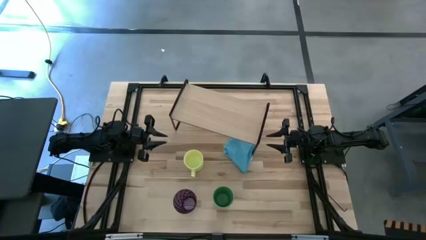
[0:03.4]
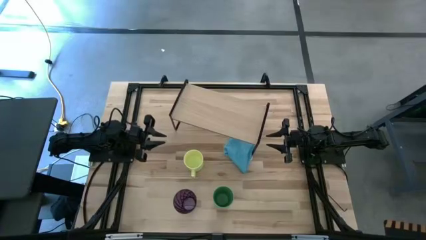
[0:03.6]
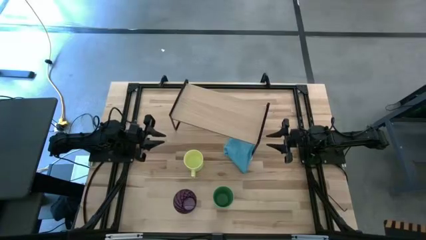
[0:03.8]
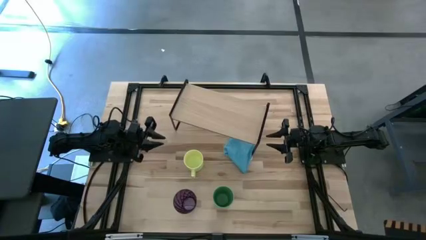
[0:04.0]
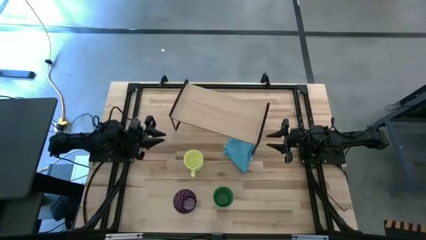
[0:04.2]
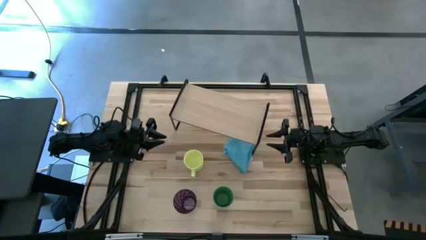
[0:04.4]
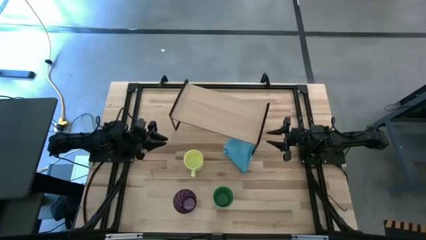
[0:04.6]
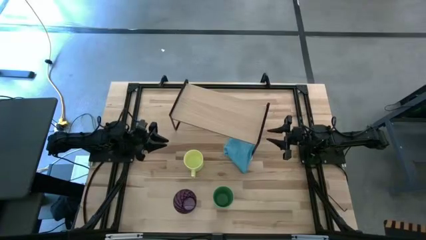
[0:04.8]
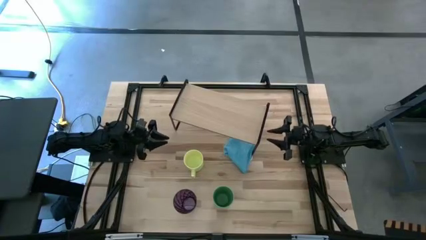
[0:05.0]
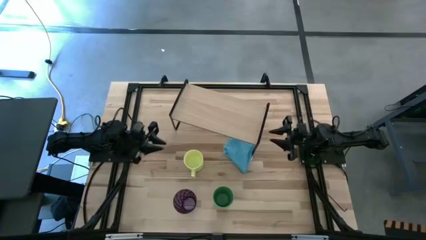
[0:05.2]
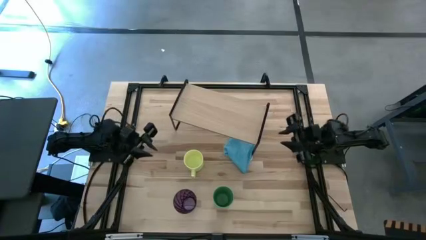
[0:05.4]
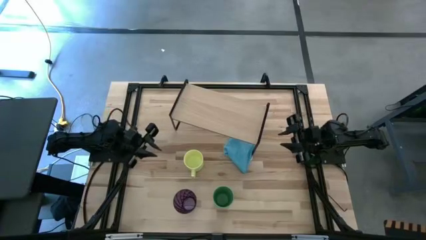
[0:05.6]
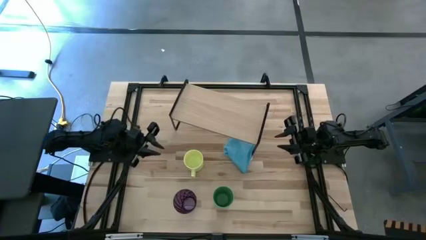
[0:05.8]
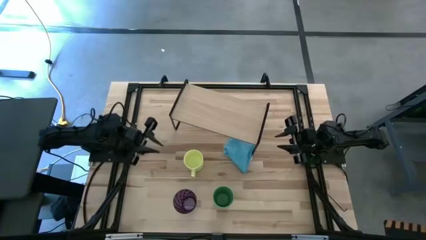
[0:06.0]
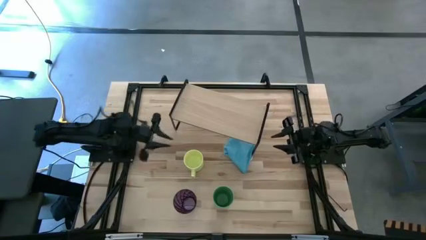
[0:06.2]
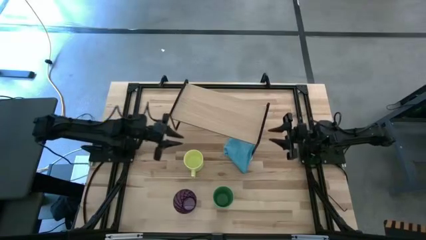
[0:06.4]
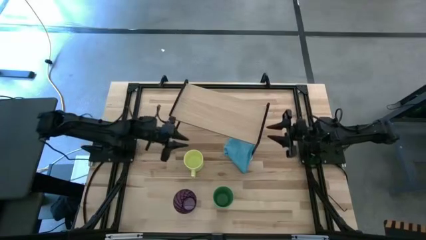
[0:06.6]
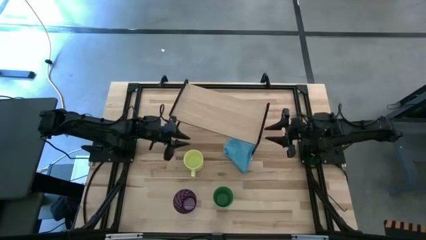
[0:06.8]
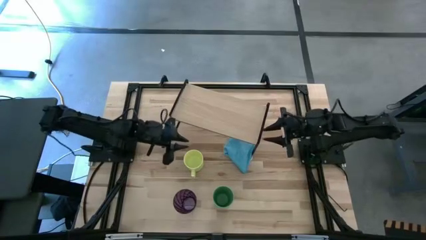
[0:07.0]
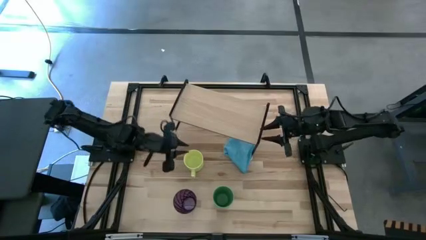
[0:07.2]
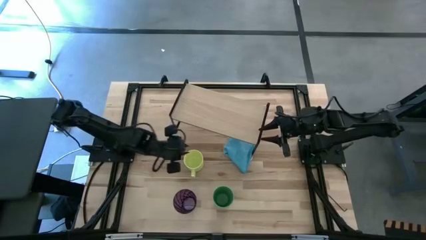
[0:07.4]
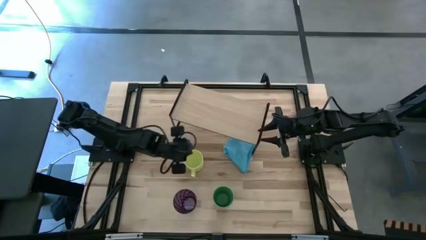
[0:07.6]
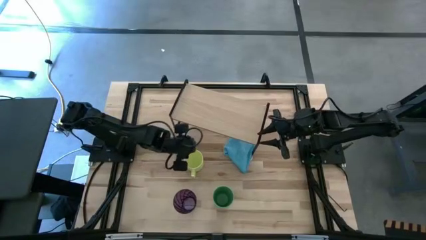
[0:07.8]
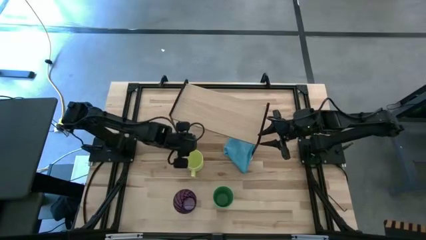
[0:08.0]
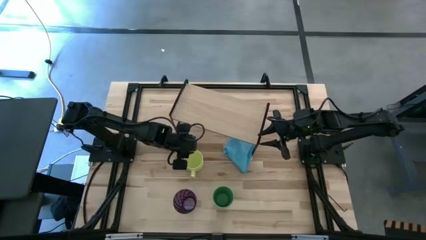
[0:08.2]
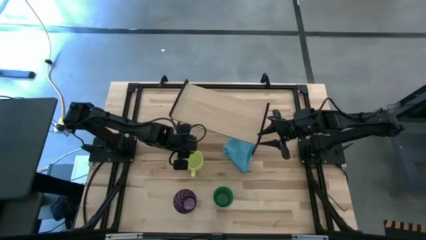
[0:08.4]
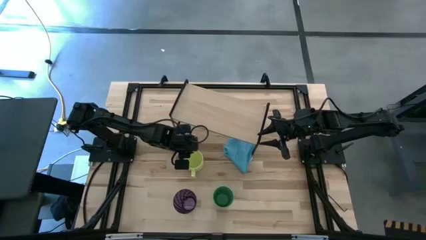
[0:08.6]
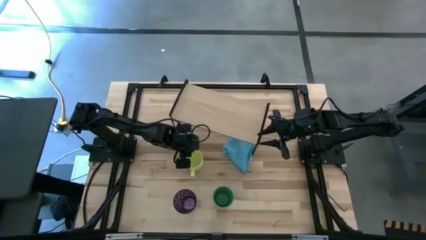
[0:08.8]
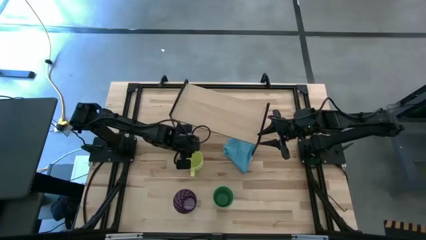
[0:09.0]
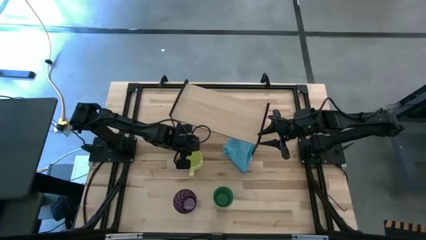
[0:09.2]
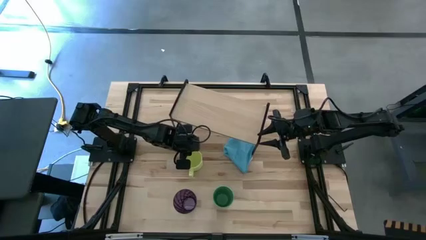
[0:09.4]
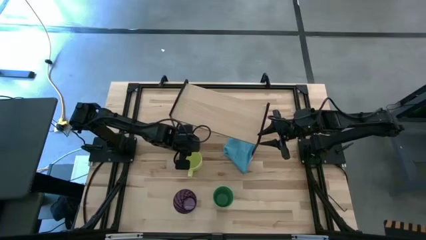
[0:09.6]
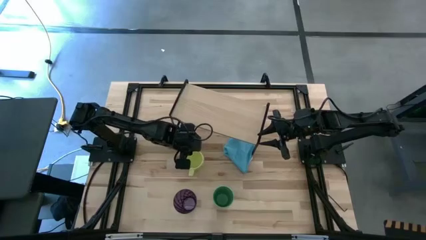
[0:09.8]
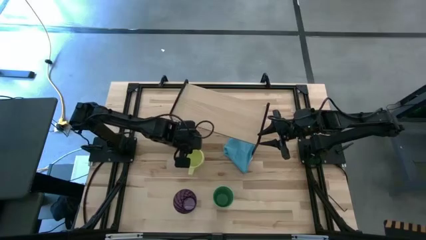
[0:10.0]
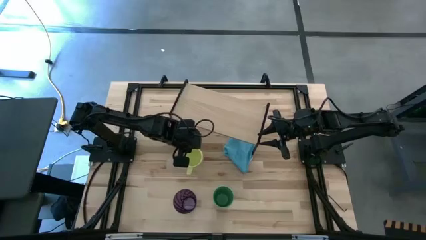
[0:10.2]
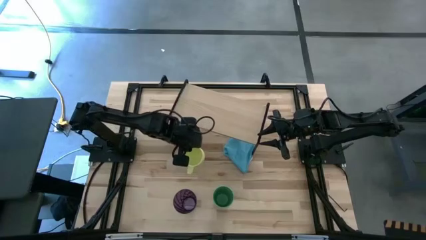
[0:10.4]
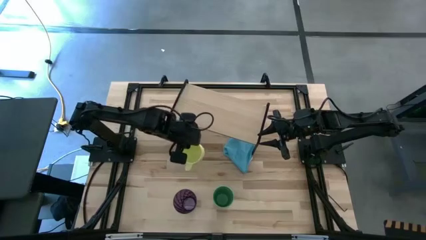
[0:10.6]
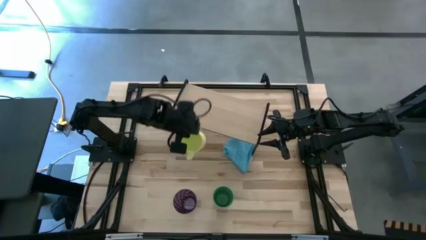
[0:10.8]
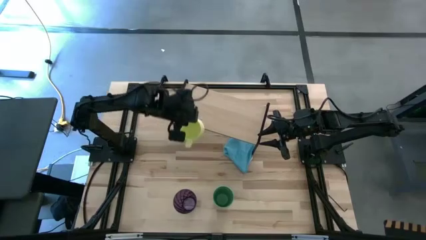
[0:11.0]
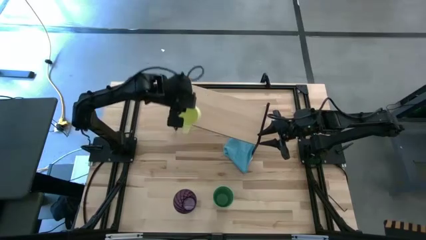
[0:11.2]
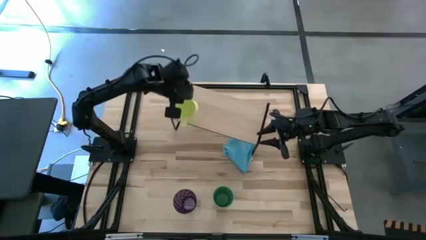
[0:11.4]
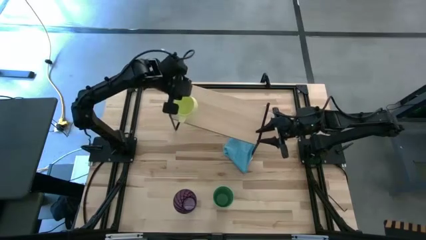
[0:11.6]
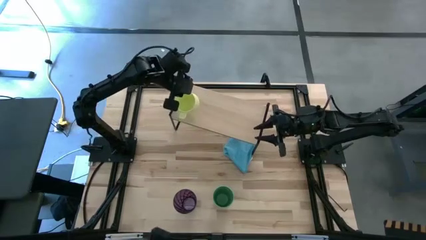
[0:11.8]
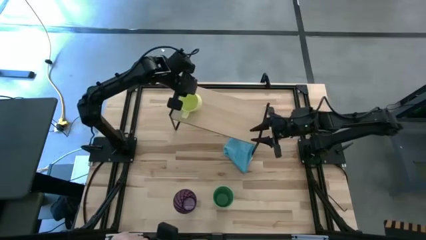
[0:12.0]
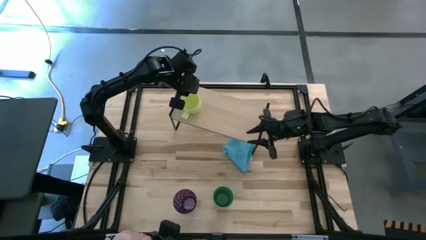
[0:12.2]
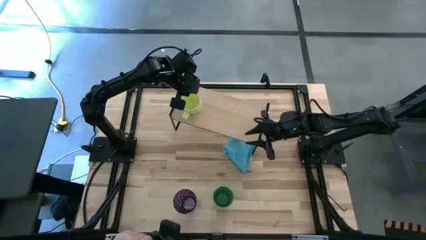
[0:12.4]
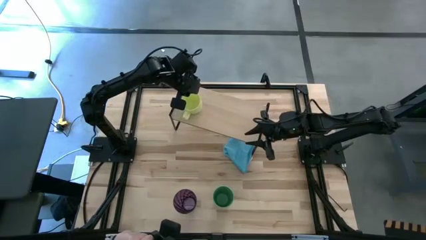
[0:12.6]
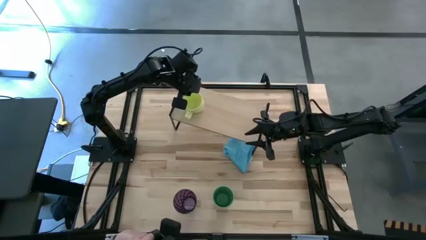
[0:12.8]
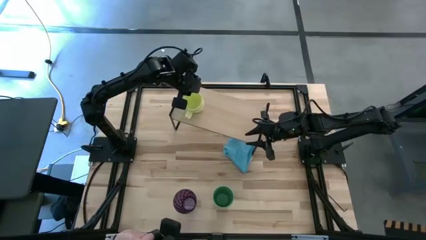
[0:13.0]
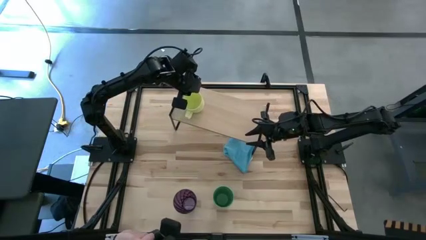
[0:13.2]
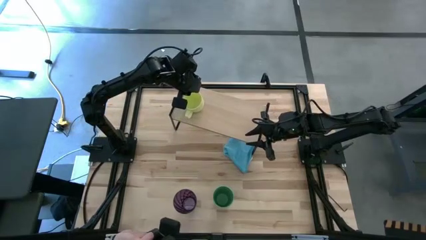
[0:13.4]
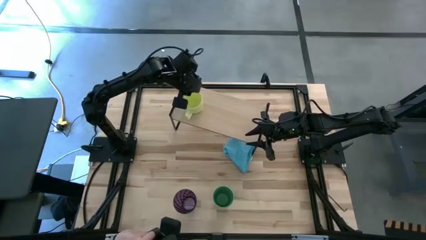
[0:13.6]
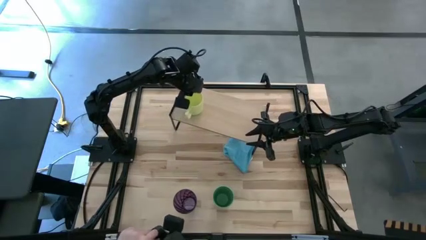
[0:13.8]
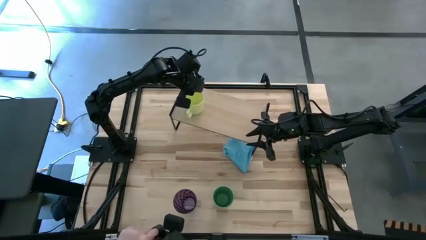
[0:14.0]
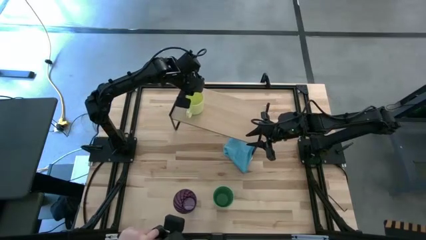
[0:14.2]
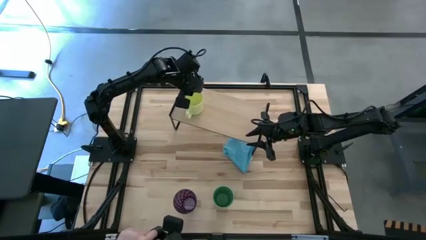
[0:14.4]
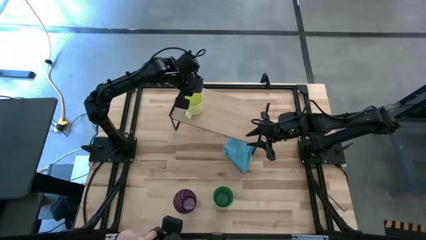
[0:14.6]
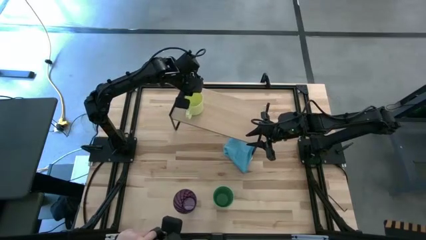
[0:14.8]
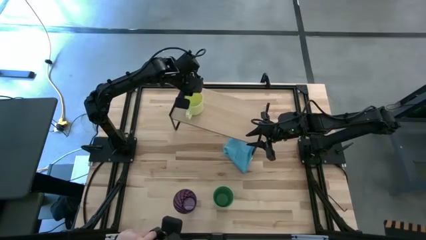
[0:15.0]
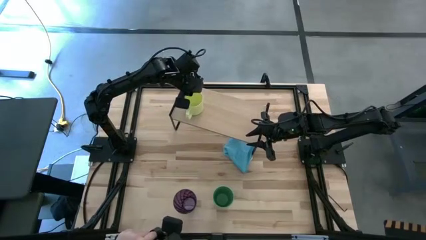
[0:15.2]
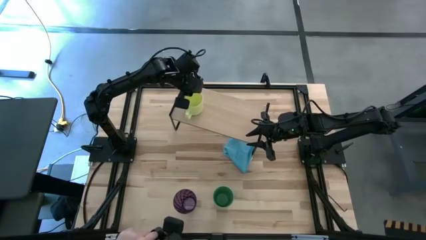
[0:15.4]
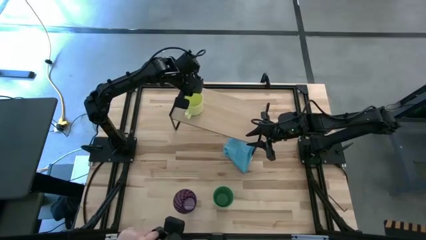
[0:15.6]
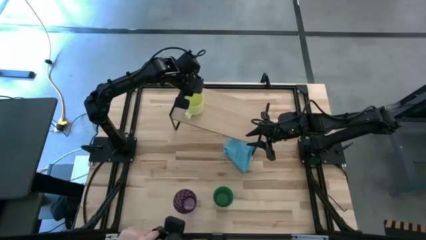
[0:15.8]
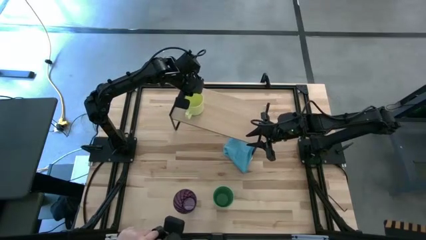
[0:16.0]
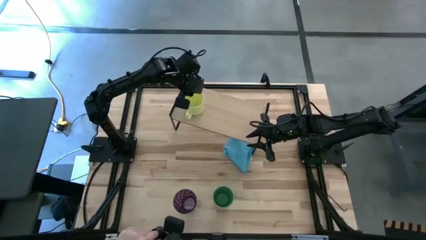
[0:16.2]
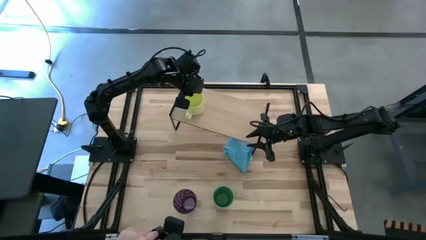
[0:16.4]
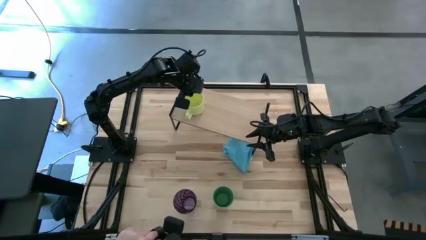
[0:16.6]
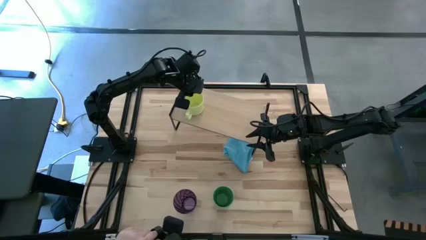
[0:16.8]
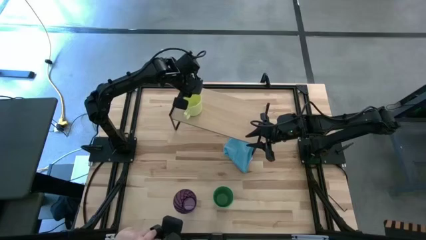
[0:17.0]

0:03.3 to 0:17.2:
Task: Stack small to large cups/mugs on shelf
Put the yellow mug on the shelf
